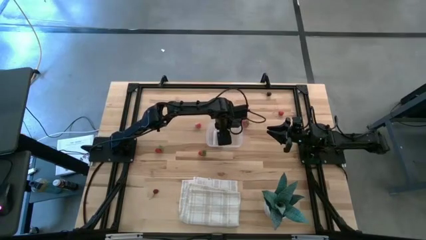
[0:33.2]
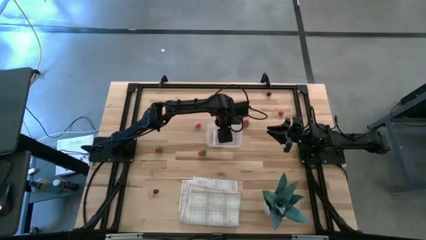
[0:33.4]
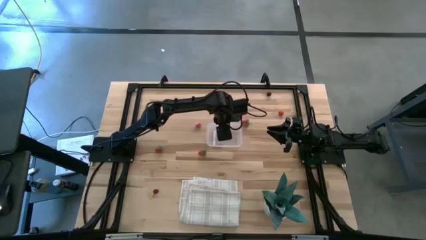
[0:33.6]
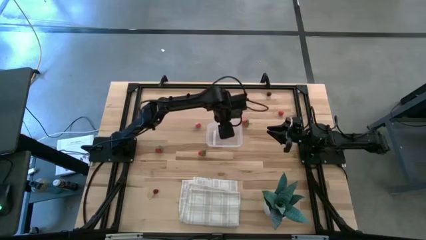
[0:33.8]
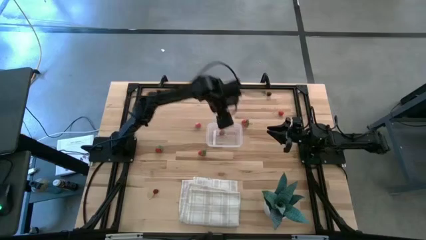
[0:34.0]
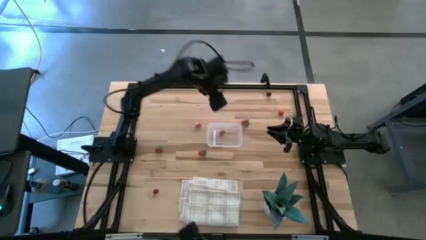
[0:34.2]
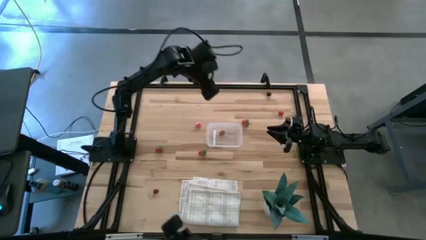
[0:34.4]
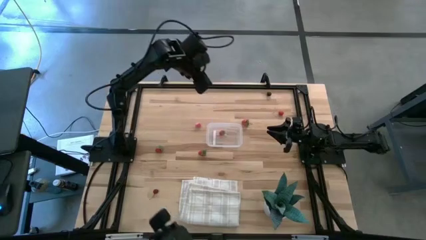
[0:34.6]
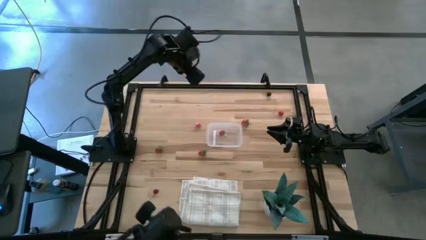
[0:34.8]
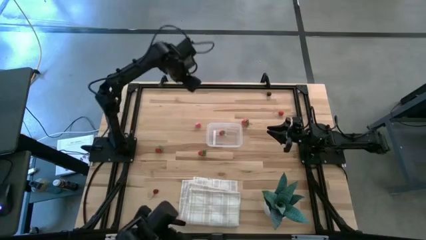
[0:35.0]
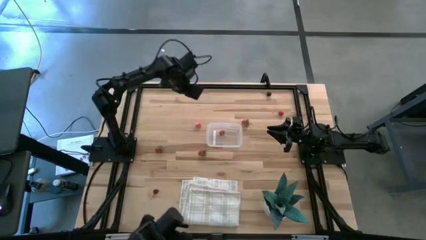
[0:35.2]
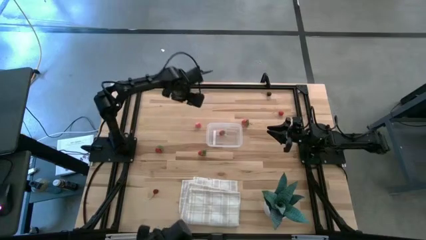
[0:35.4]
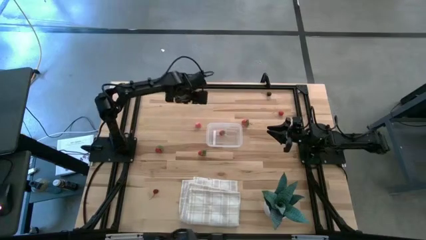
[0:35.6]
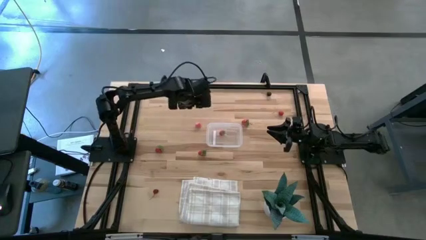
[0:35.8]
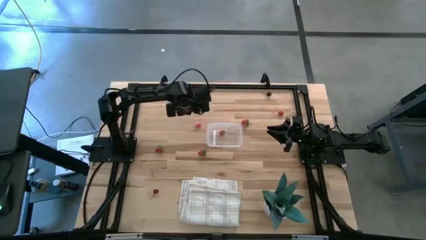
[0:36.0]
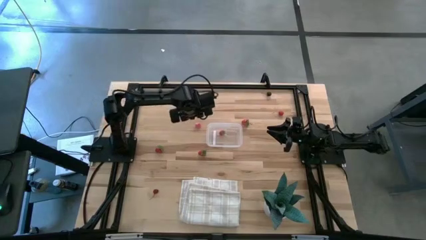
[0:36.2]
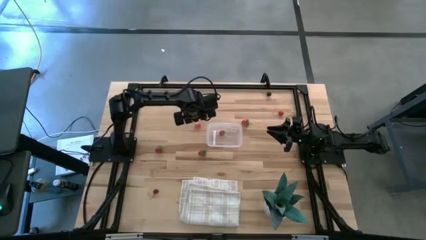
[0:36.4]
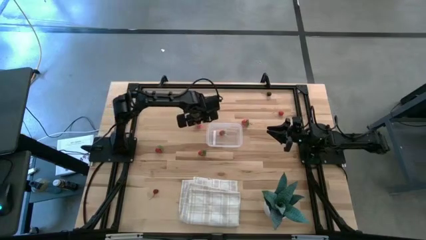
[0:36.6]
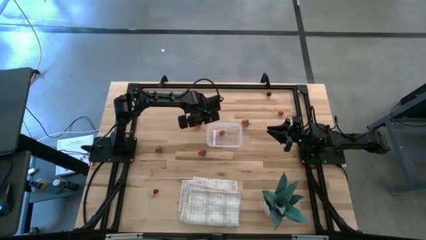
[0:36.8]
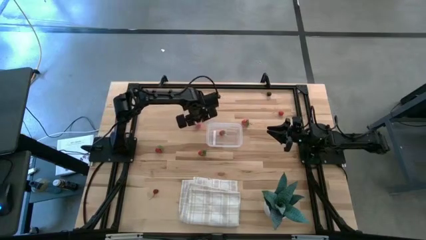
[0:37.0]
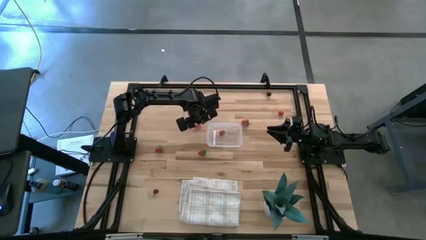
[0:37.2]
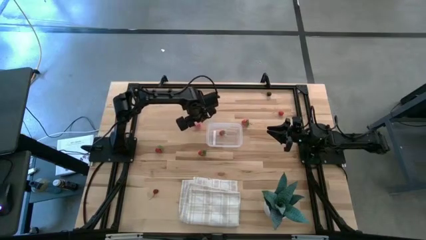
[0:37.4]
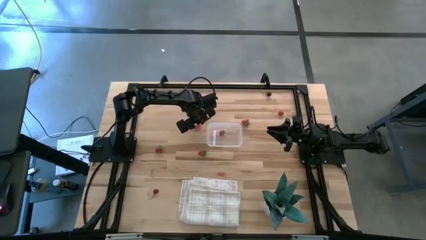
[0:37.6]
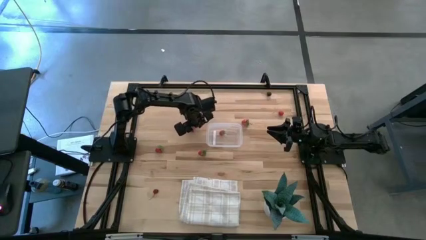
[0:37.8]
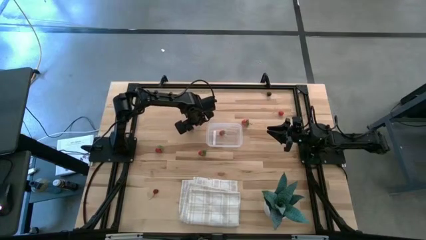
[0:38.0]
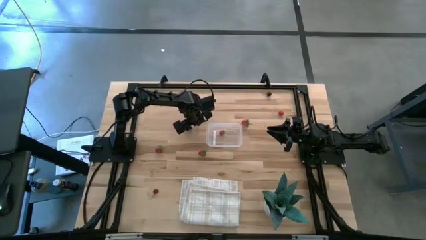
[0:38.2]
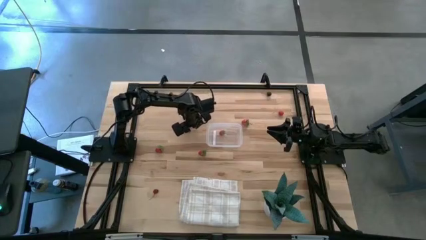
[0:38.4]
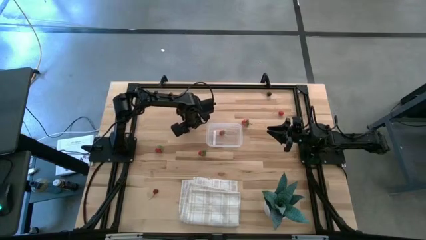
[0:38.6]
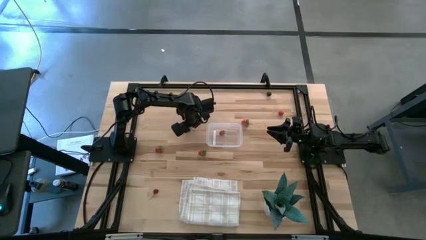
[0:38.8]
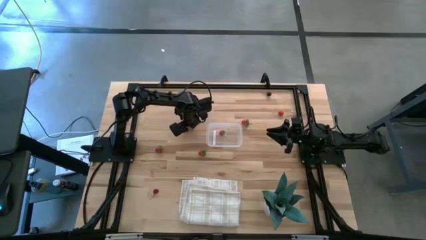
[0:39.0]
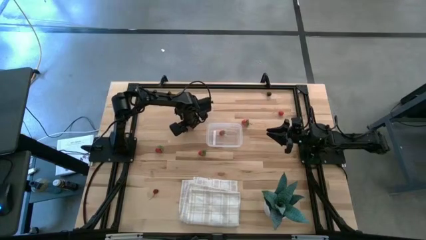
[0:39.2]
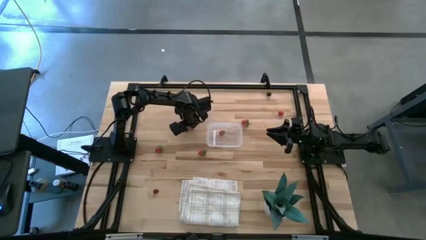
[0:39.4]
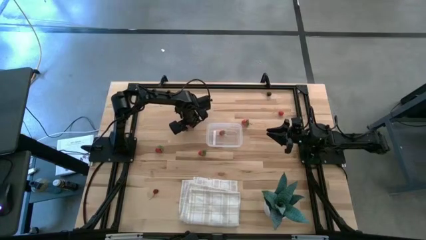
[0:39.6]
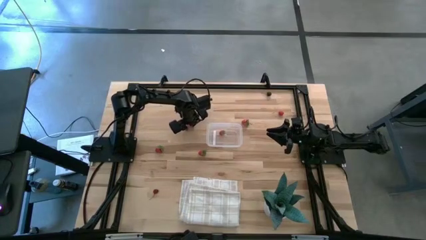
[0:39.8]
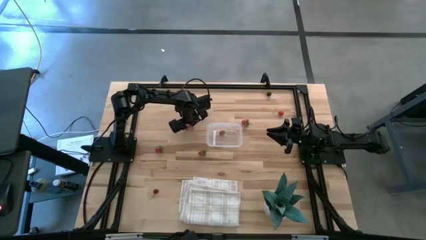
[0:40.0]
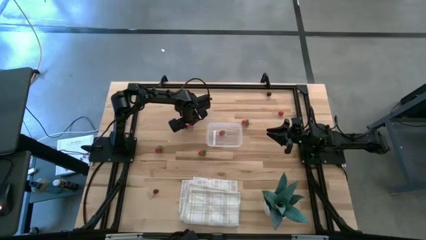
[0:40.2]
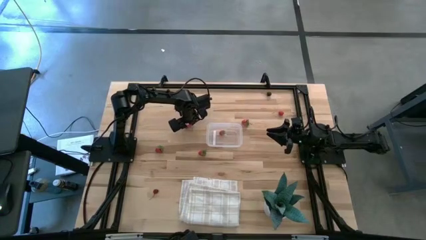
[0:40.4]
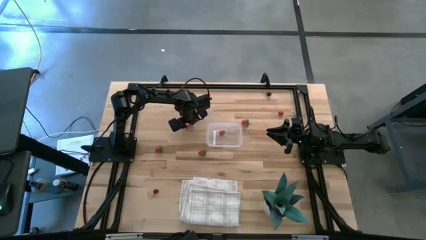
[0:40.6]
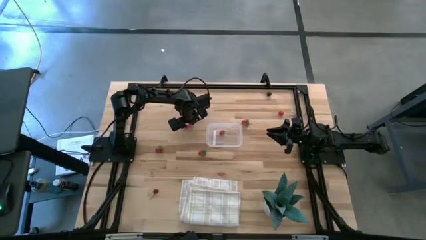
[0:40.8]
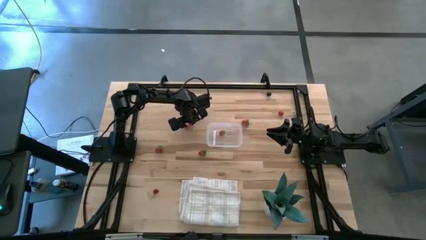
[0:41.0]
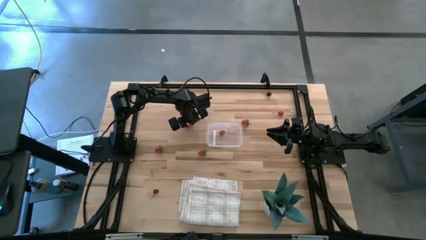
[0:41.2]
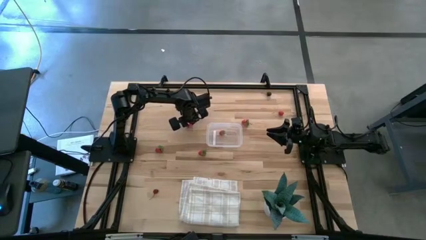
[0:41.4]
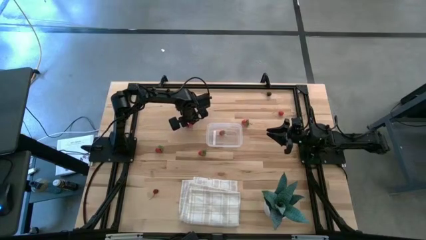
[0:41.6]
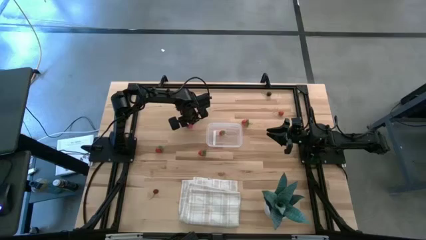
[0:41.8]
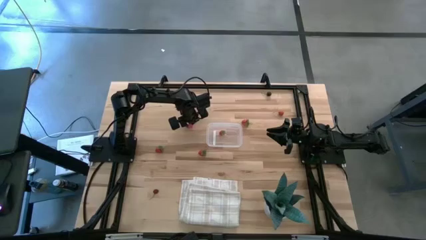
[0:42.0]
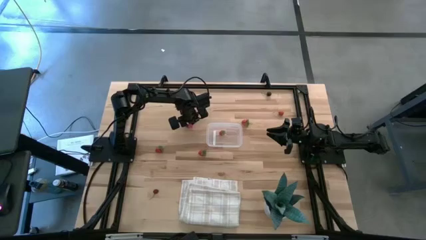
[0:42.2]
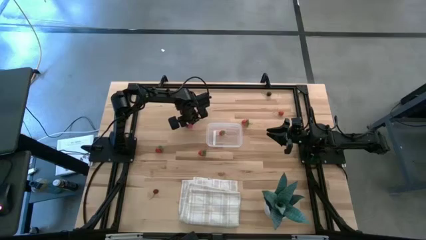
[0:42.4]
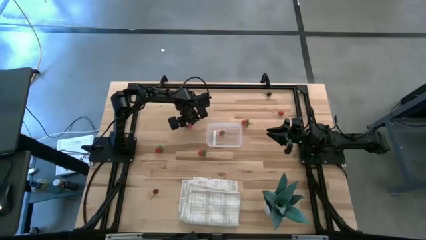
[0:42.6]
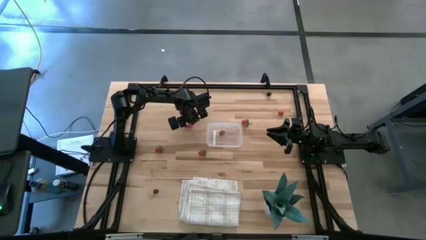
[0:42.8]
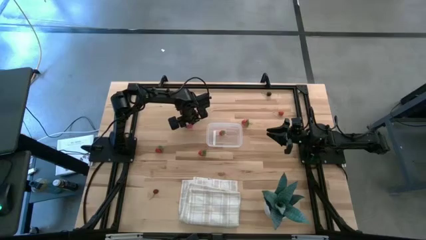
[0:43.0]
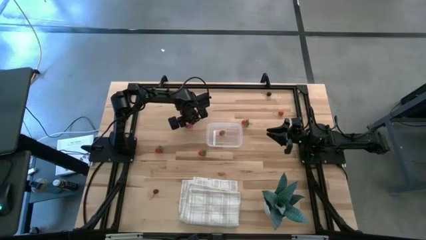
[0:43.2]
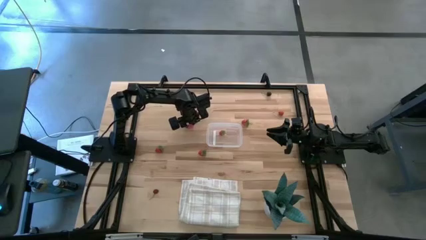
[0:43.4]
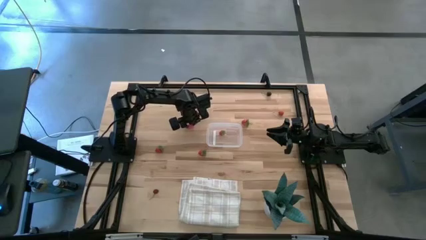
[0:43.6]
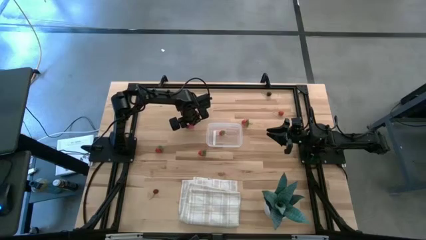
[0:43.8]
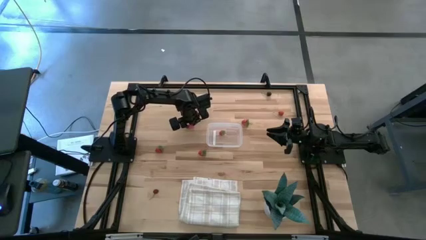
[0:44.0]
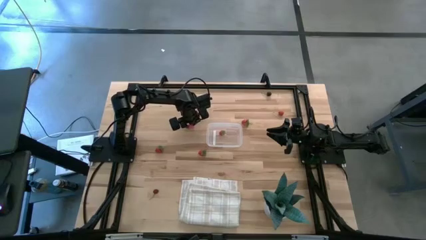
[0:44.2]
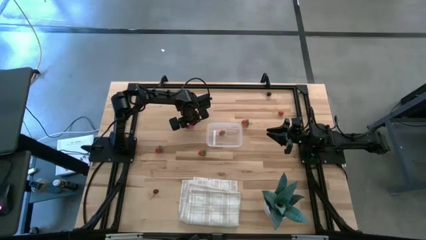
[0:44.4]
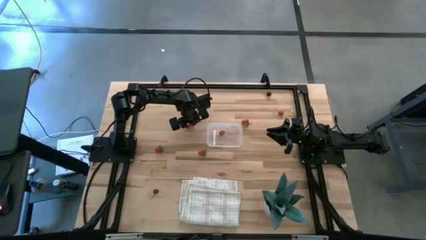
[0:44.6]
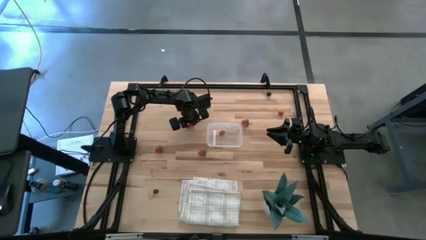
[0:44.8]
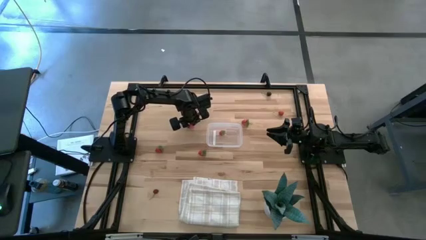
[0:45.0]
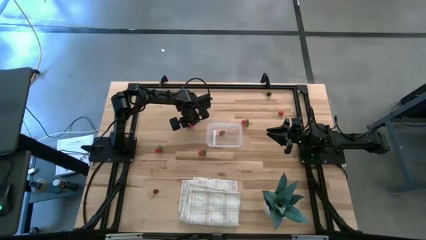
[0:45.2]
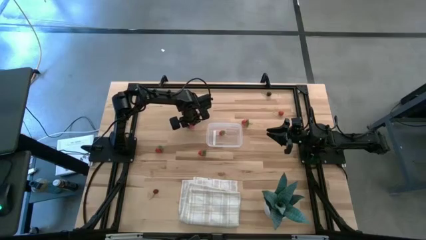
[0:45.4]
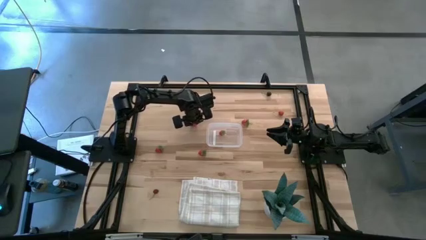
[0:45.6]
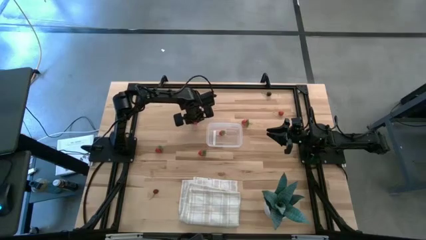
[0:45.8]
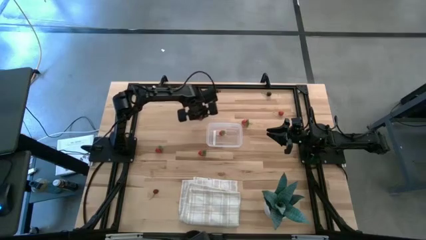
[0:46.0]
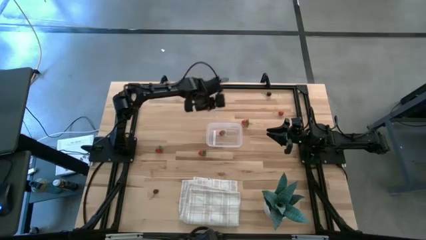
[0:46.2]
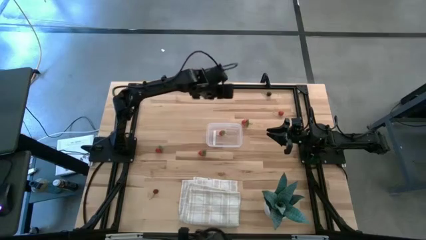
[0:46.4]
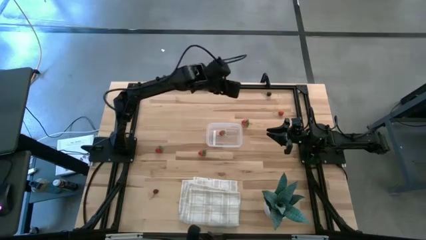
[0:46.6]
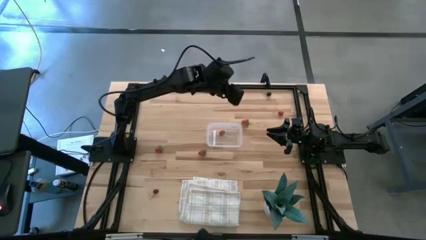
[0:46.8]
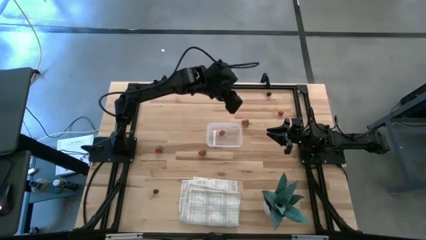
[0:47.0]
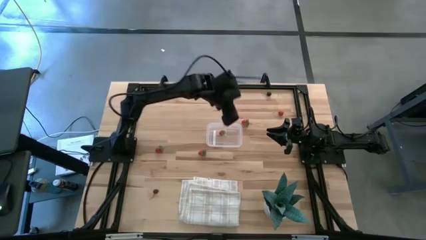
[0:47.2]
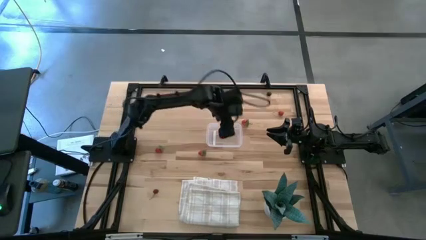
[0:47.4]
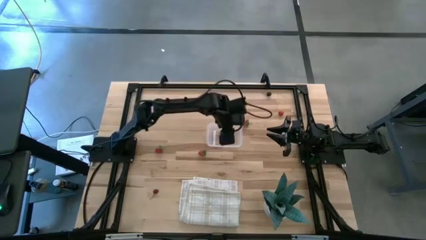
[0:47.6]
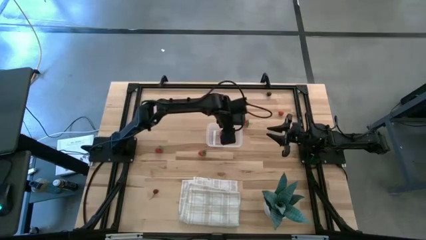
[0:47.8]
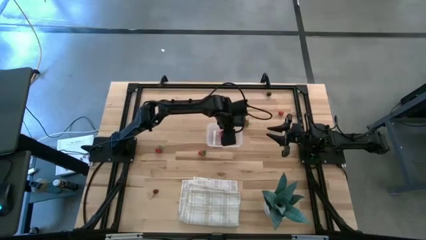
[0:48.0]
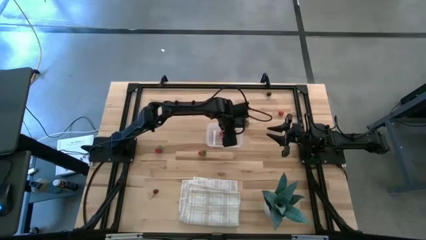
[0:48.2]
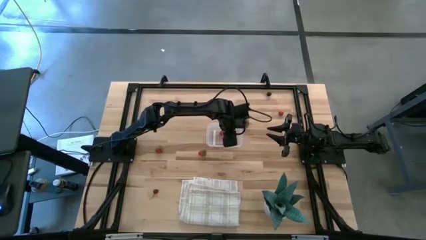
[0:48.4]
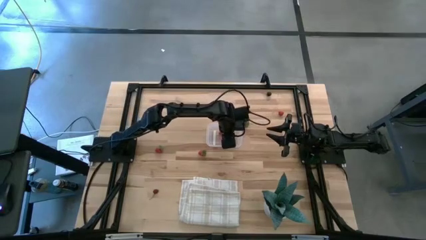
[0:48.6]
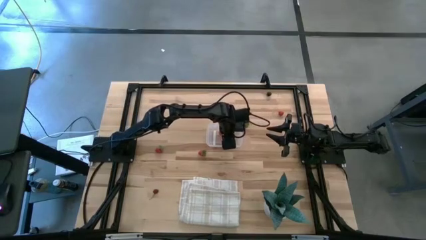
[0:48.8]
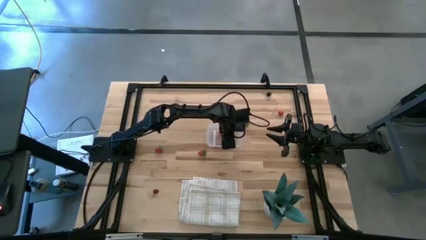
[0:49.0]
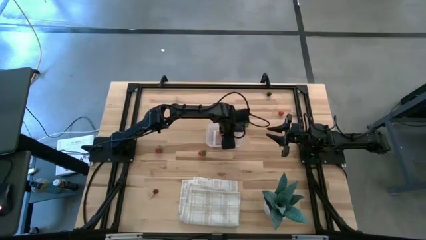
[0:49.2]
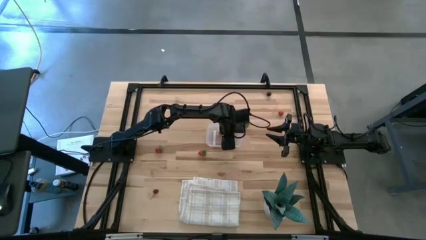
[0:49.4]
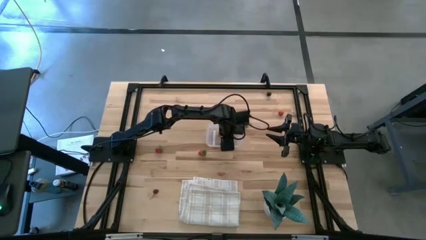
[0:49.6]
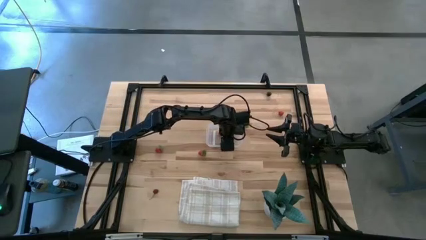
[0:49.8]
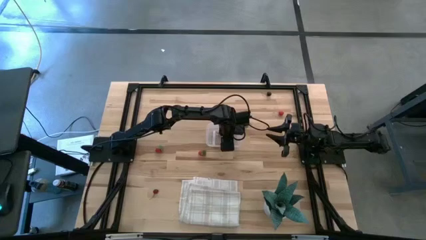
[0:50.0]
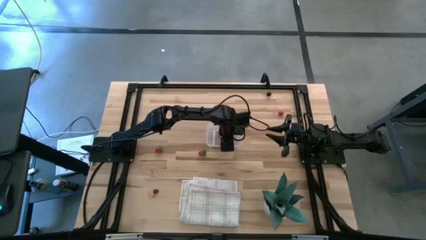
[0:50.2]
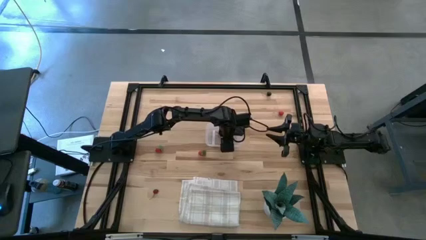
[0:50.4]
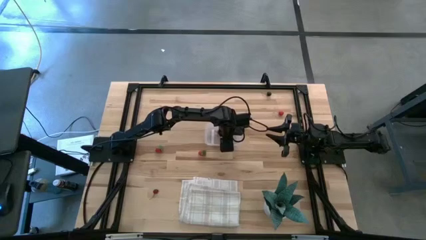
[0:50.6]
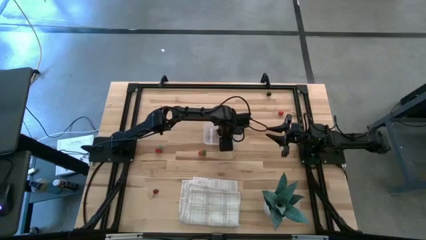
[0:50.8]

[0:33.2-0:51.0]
Task: Pick and placing Produce into tupperware
Put the apricot into the transparent bin
